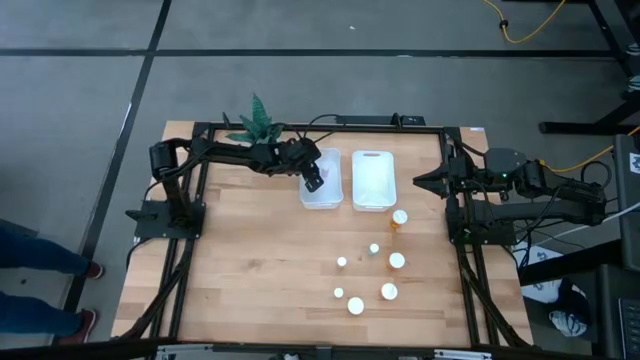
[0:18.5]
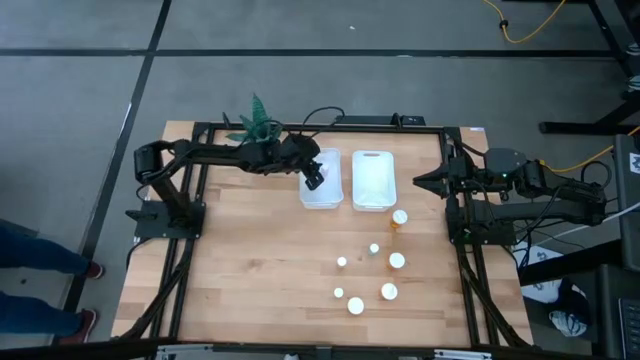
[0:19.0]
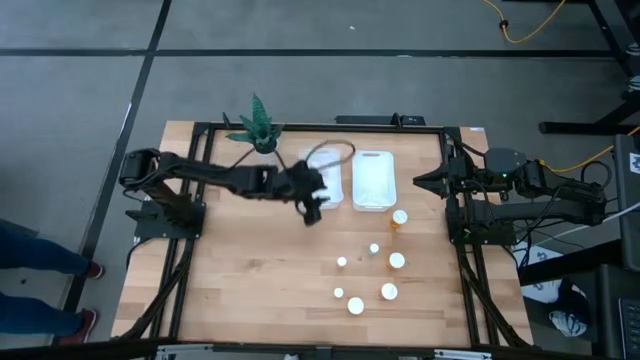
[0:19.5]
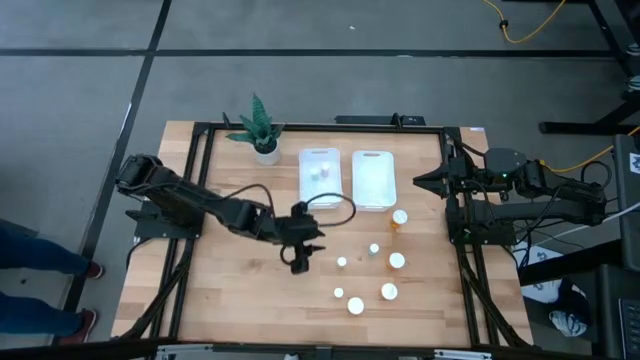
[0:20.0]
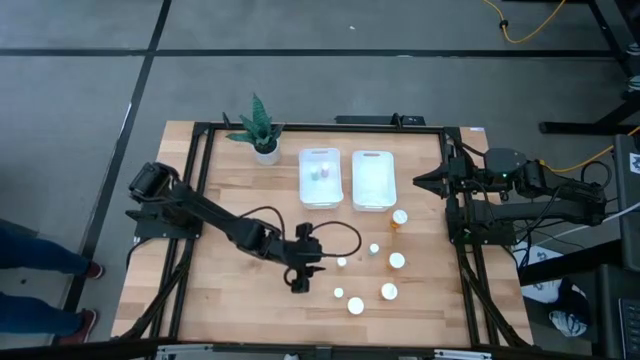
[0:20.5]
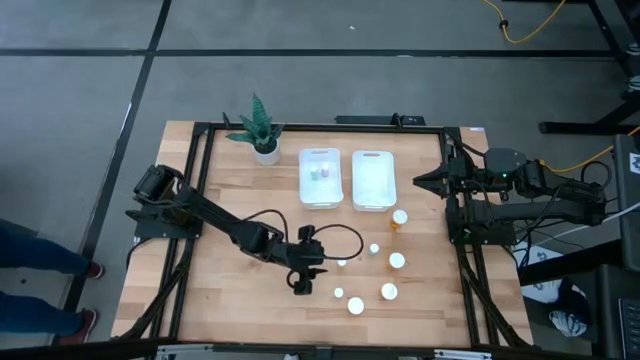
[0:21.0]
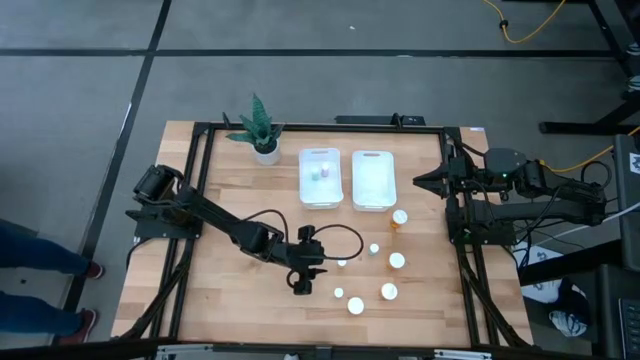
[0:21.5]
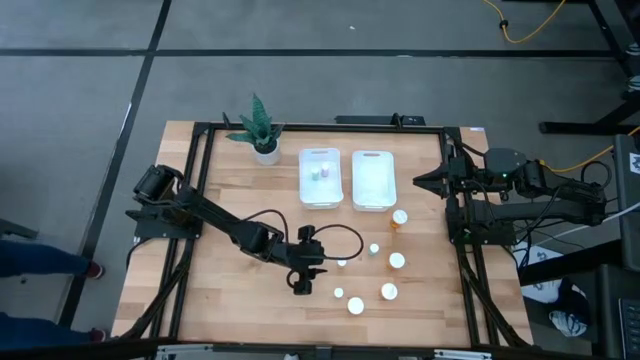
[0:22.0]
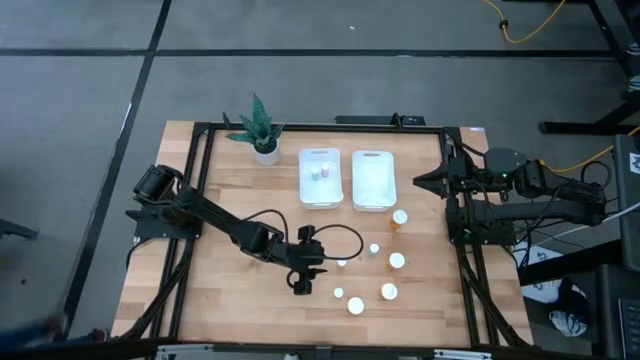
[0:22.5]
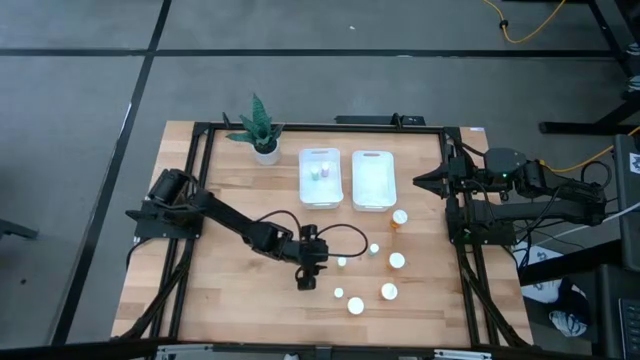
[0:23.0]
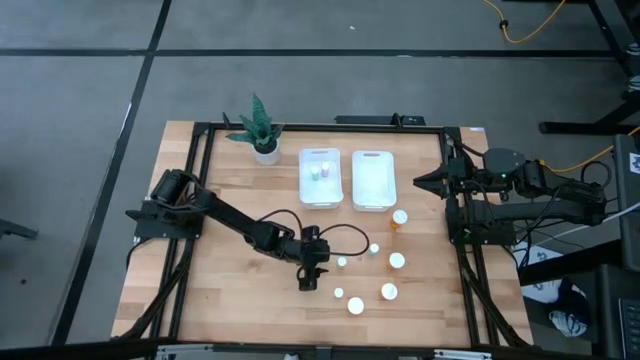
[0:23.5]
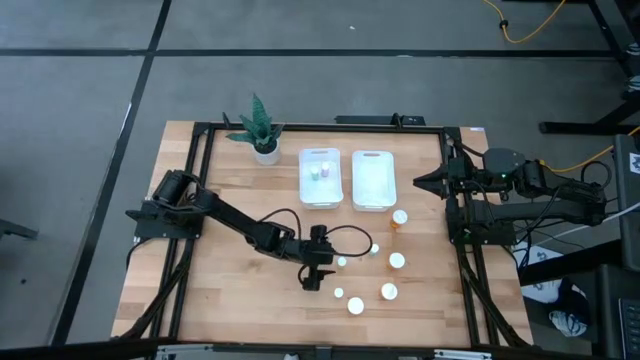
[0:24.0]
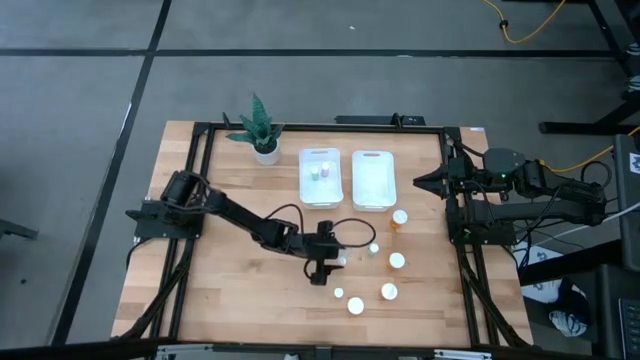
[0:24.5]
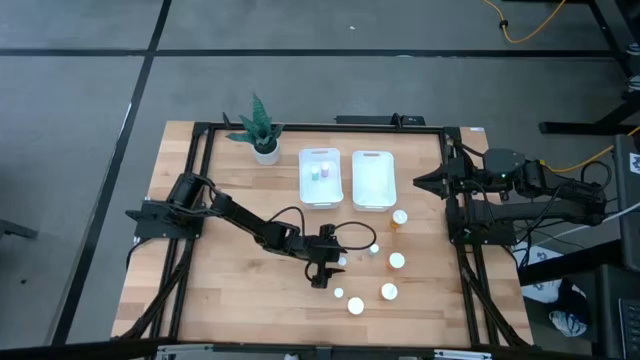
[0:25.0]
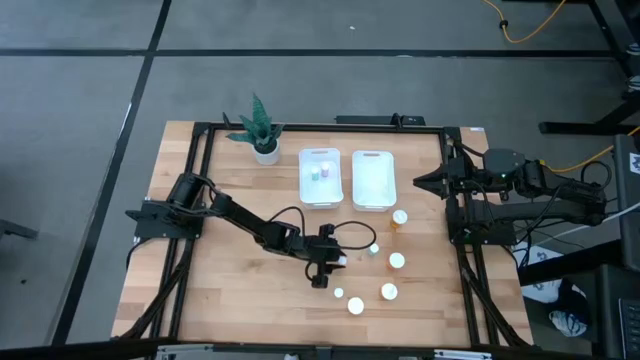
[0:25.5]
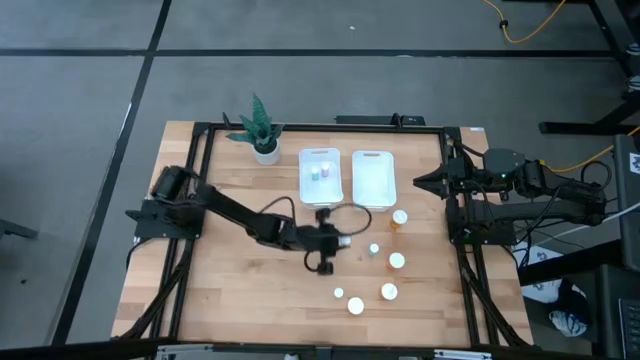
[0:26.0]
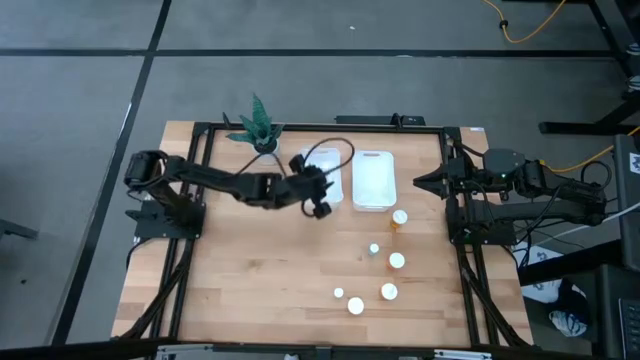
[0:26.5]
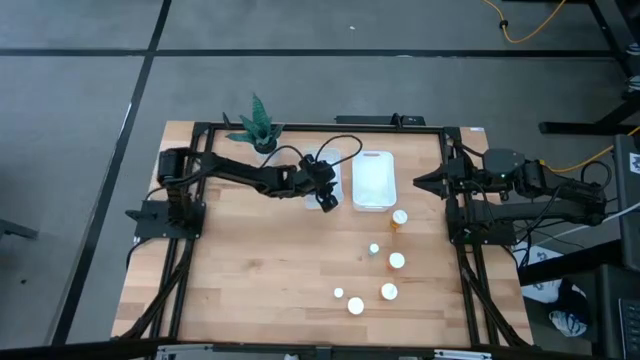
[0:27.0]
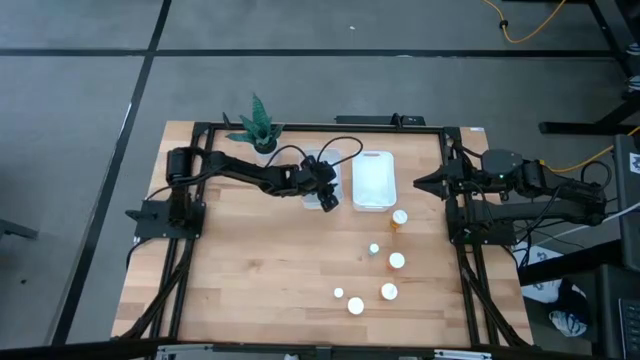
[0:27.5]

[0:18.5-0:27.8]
Task: Pick and place medicine bottles into bin by pill shape (circle, oval)
Put the top yellow pill bottle into the left white bin

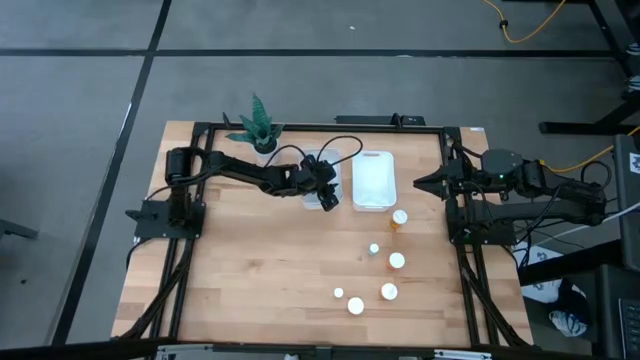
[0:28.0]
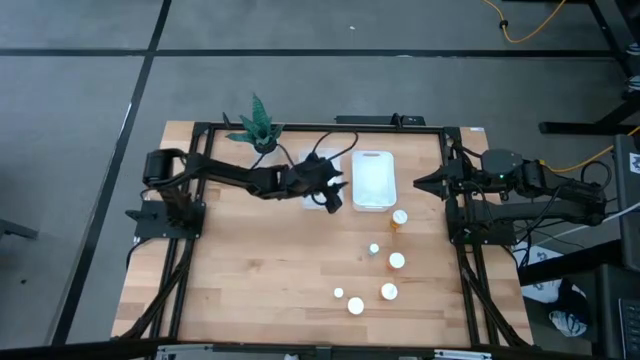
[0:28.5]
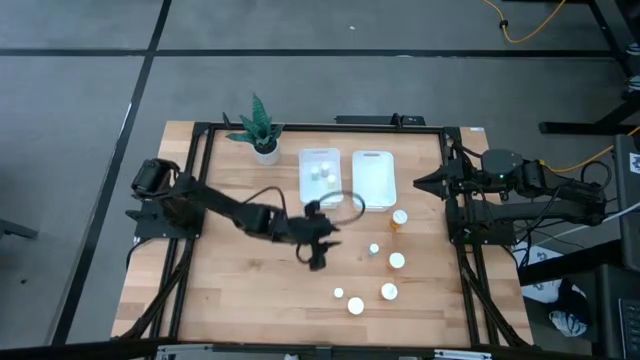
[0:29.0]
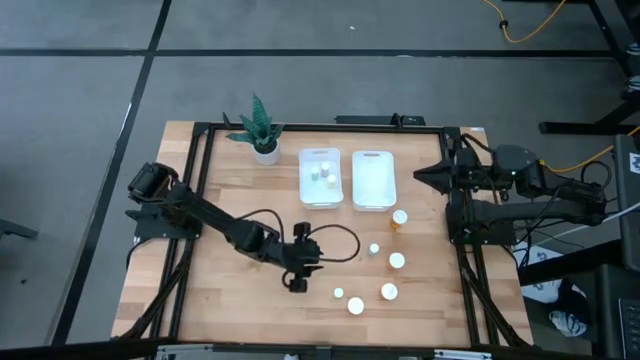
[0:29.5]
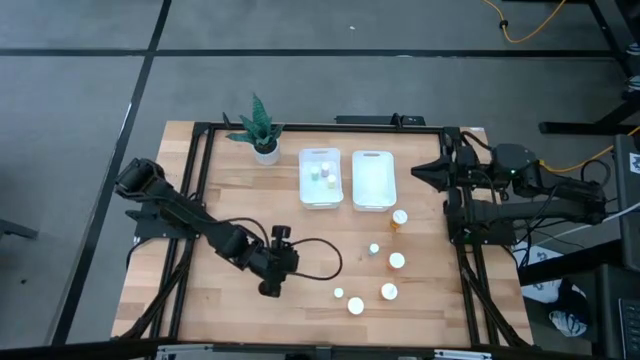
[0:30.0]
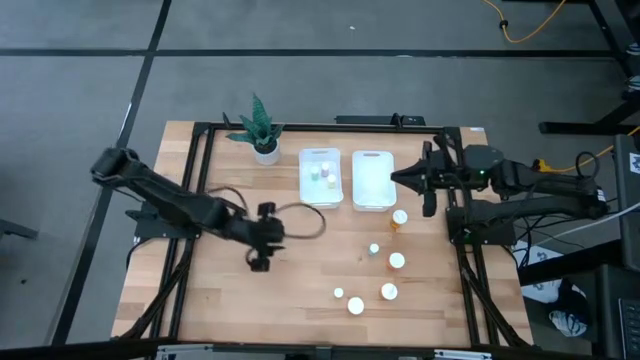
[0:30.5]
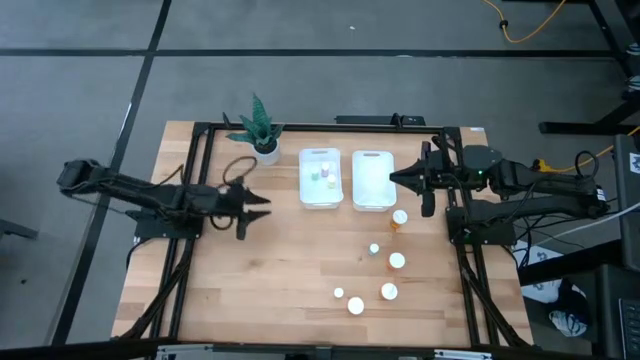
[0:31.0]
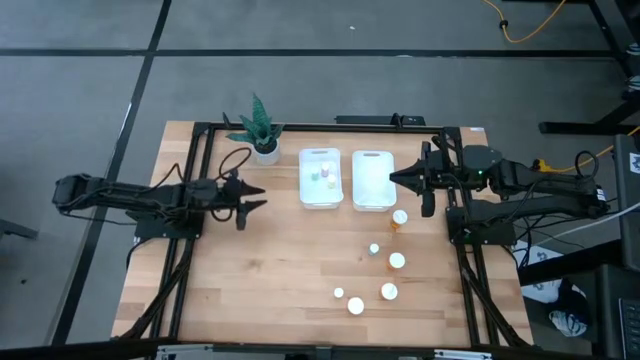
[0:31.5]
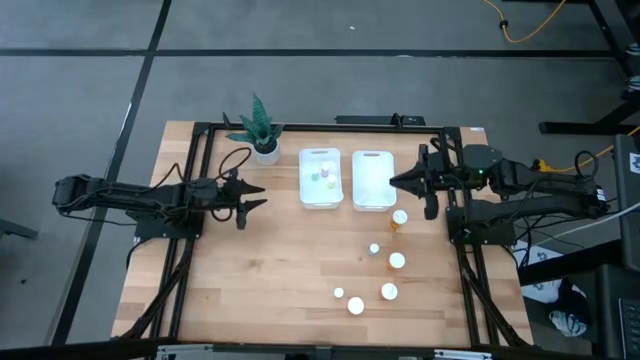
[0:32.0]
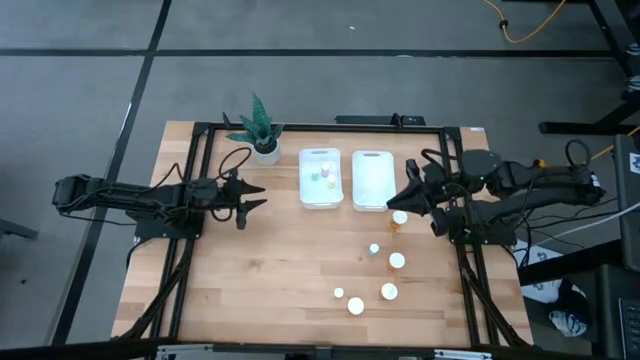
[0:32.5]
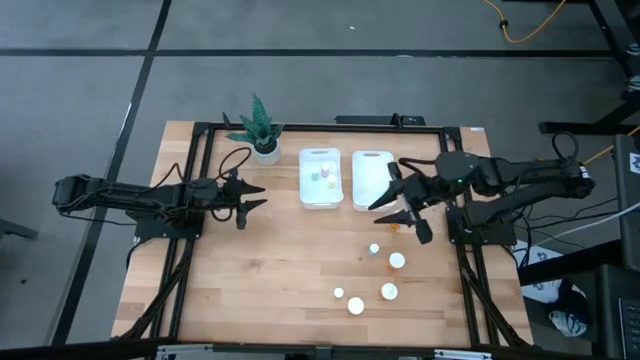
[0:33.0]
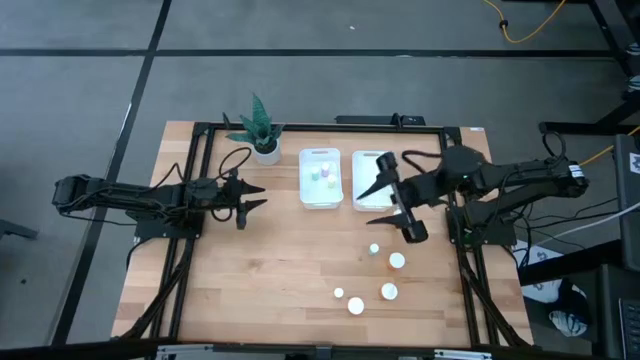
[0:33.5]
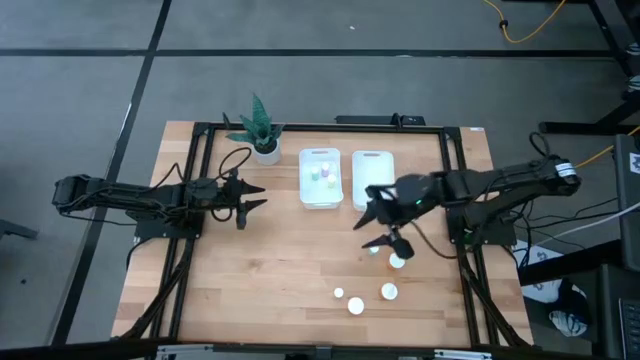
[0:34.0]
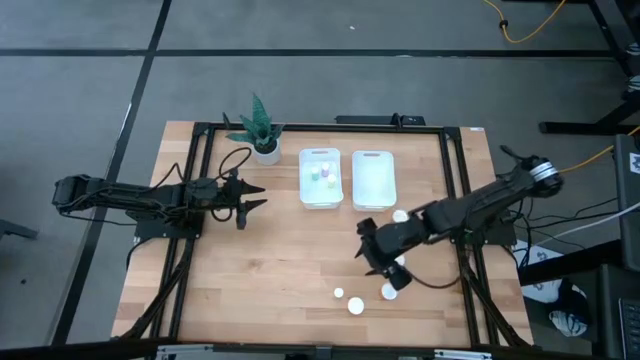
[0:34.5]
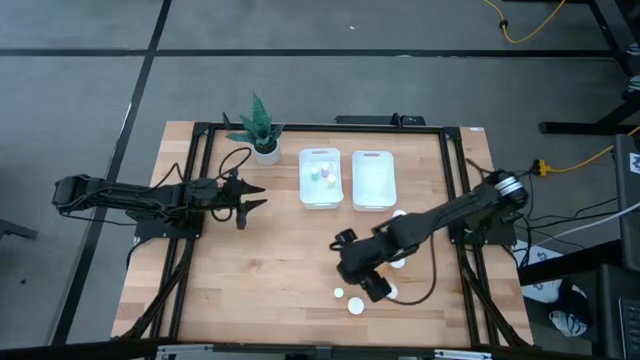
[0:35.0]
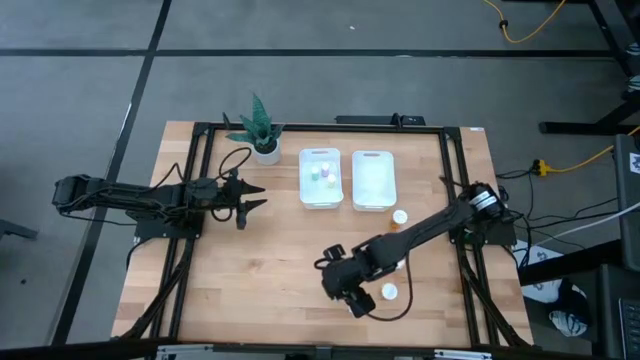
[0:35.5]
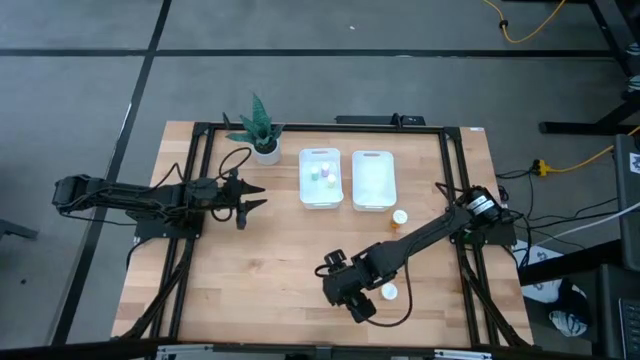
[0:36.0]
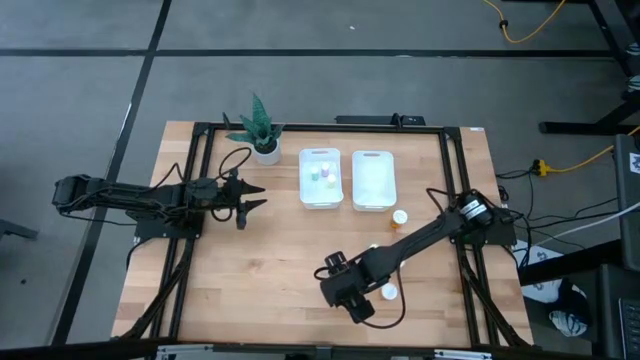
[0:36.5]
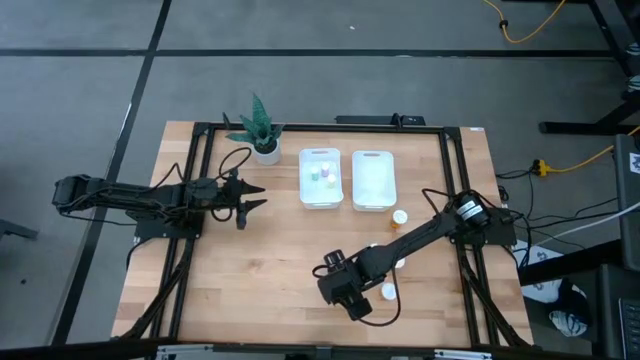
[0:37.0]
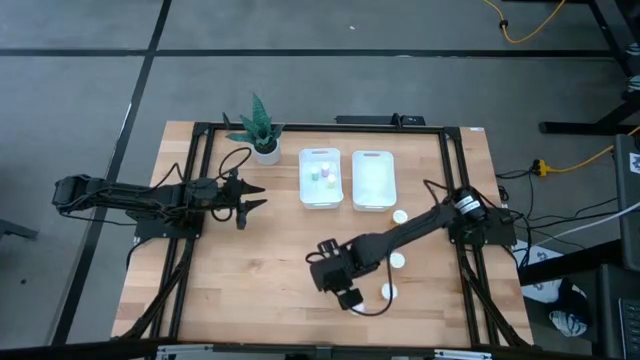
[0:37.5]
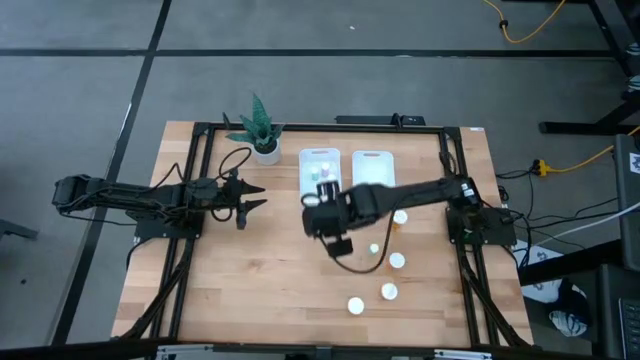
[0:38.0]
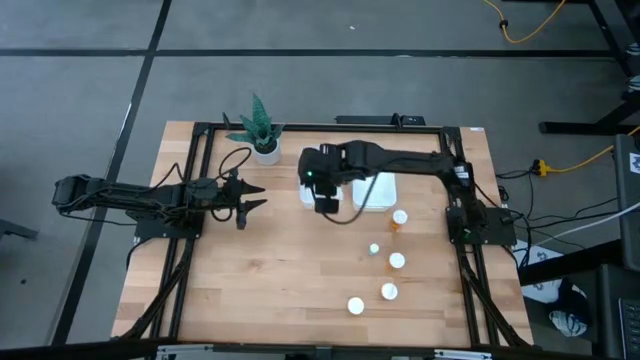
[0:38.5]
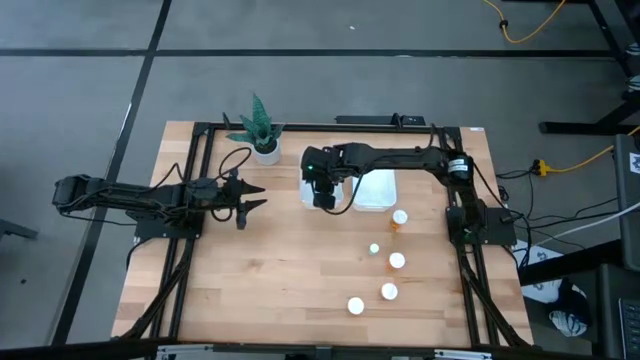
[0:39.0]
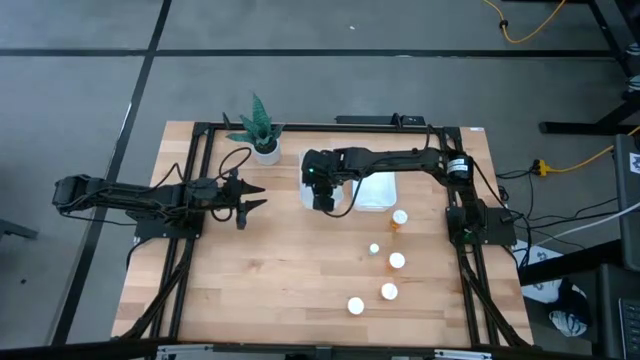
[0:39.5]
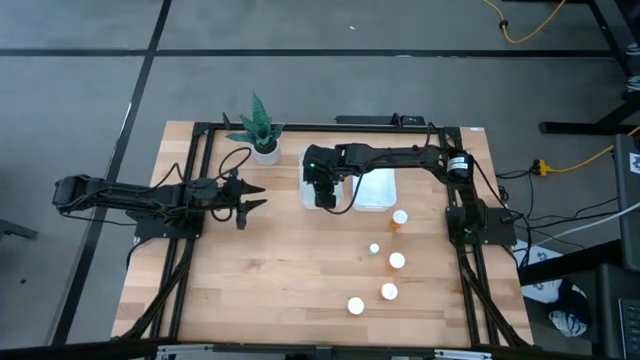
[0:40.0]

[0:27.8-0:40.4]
Put the yellow pill bottle into the left white bin
